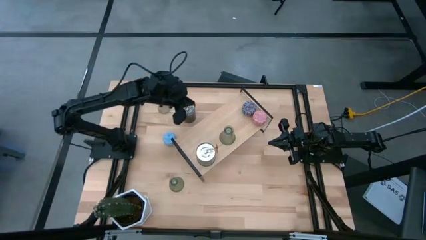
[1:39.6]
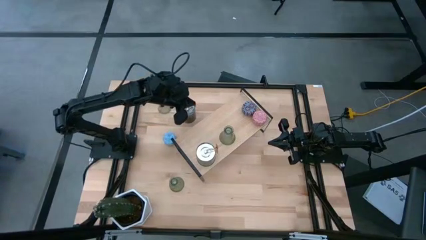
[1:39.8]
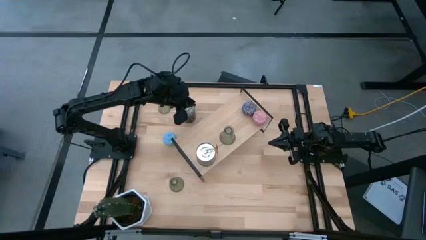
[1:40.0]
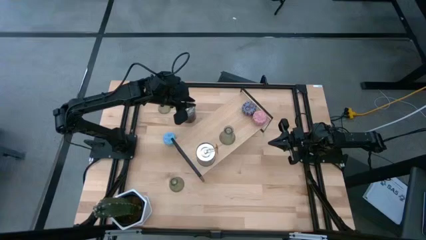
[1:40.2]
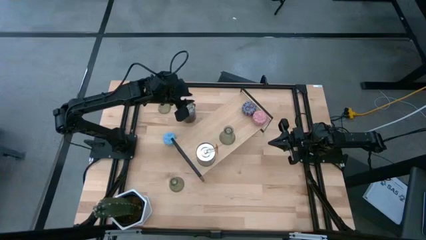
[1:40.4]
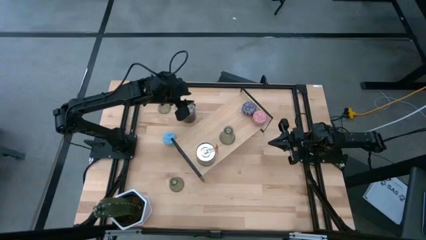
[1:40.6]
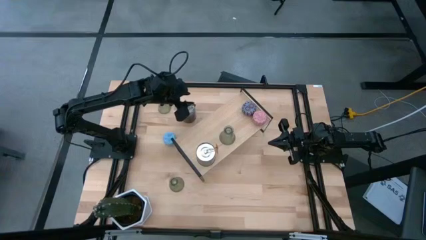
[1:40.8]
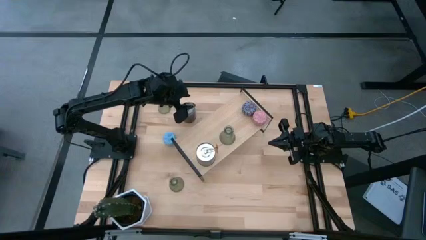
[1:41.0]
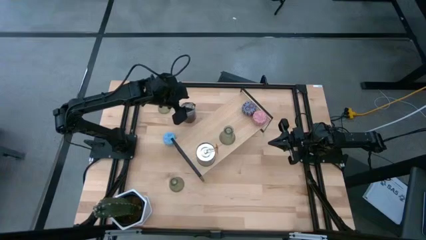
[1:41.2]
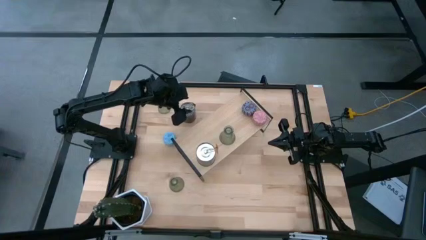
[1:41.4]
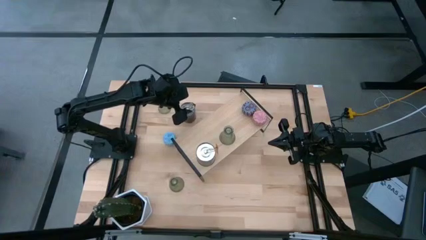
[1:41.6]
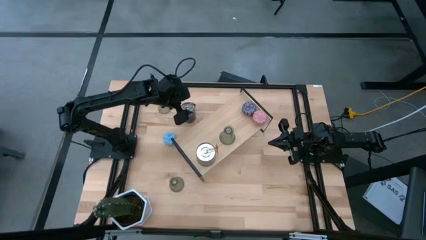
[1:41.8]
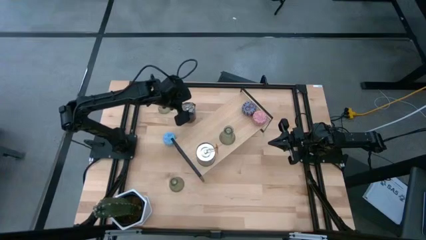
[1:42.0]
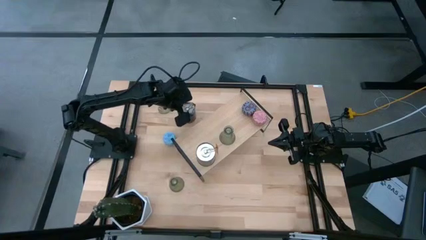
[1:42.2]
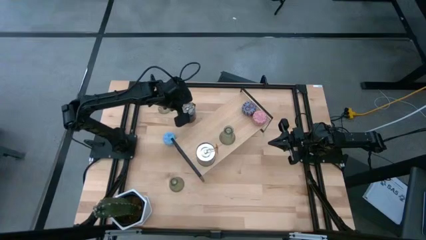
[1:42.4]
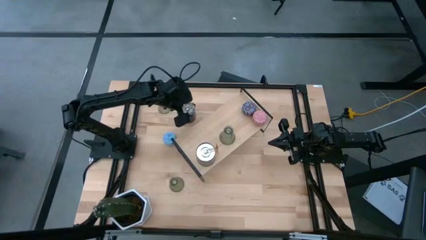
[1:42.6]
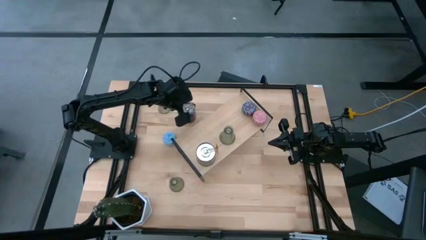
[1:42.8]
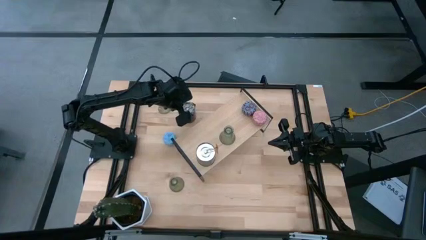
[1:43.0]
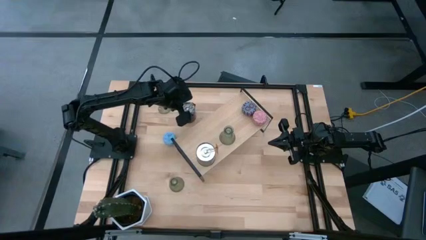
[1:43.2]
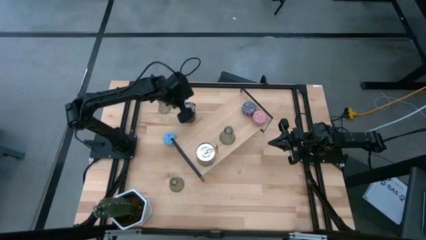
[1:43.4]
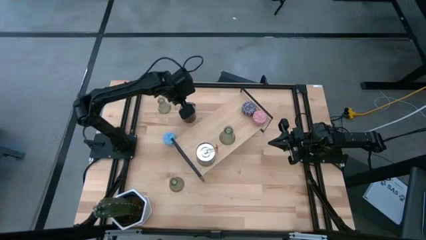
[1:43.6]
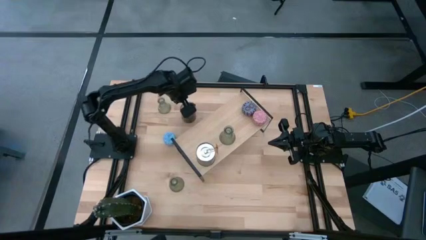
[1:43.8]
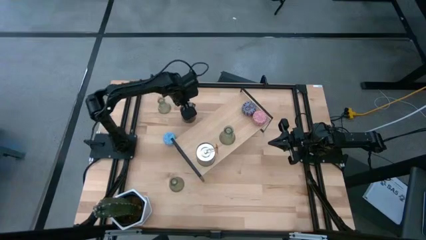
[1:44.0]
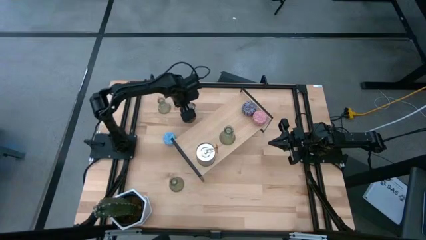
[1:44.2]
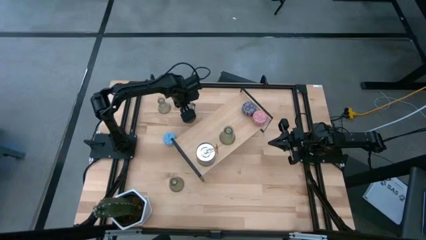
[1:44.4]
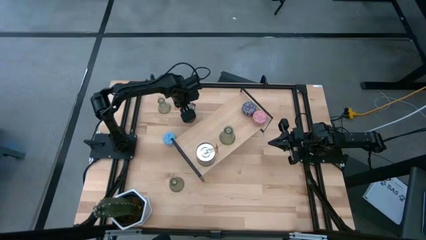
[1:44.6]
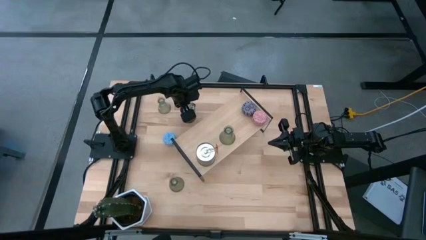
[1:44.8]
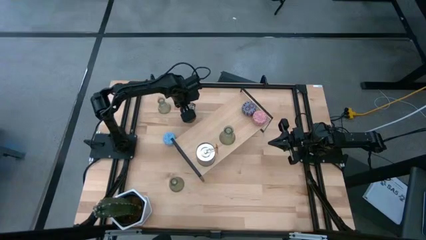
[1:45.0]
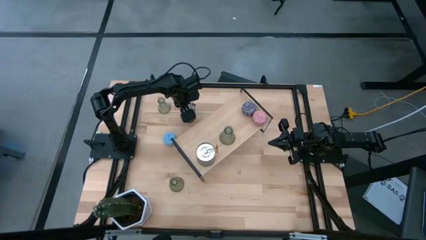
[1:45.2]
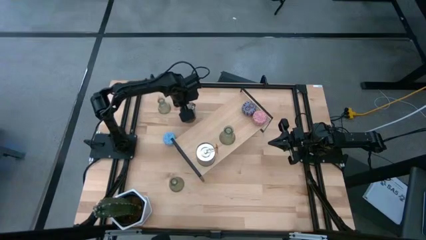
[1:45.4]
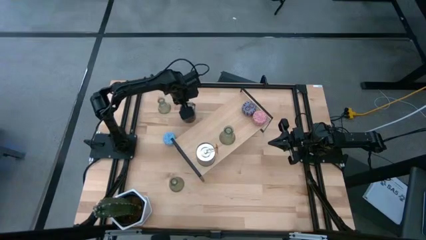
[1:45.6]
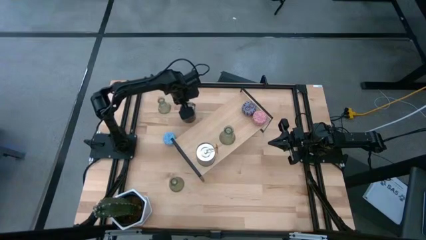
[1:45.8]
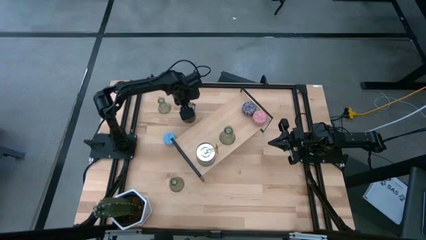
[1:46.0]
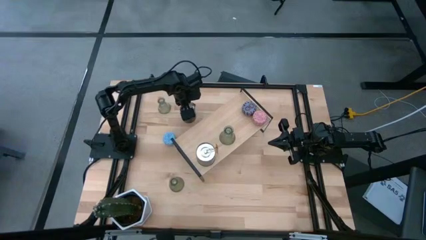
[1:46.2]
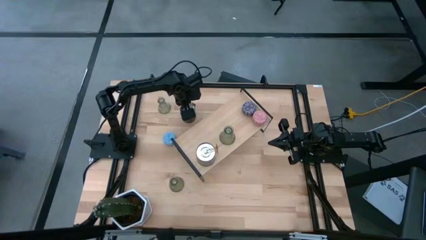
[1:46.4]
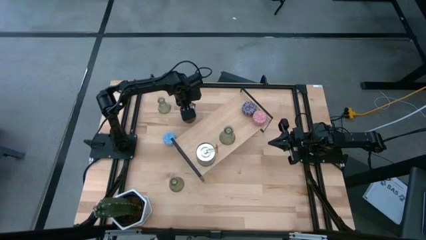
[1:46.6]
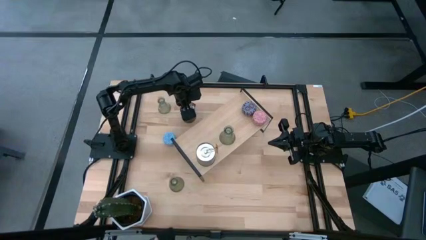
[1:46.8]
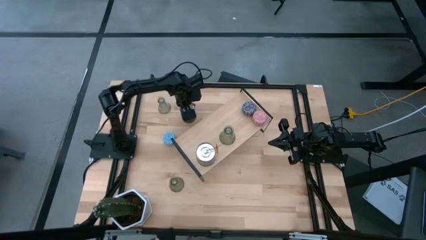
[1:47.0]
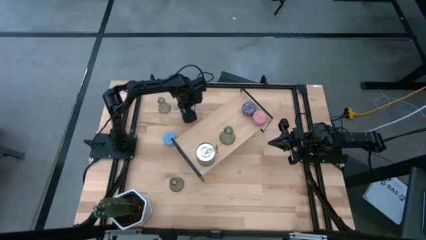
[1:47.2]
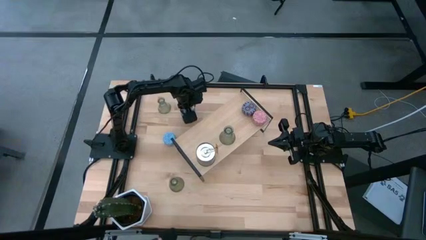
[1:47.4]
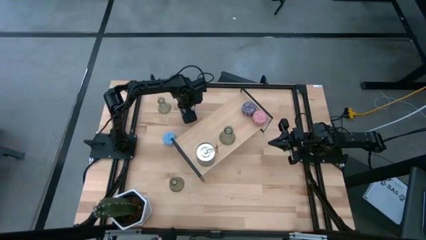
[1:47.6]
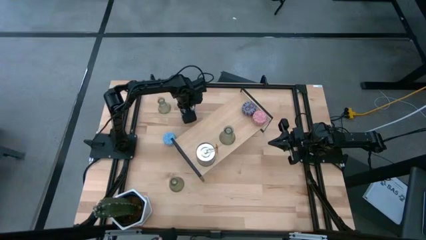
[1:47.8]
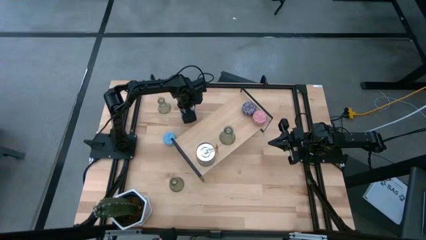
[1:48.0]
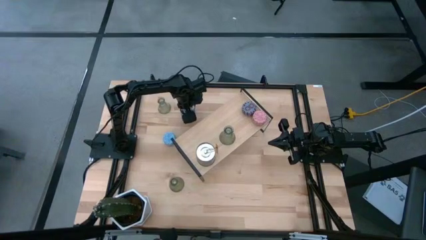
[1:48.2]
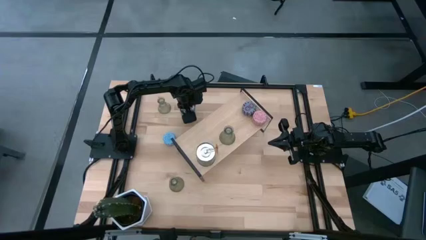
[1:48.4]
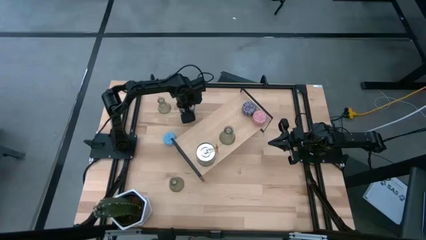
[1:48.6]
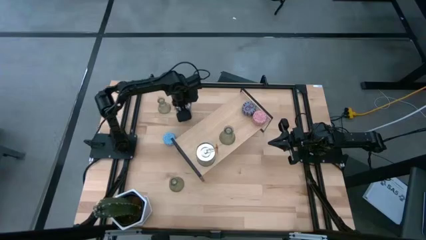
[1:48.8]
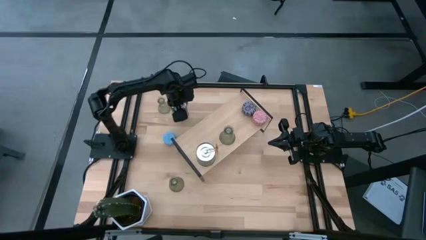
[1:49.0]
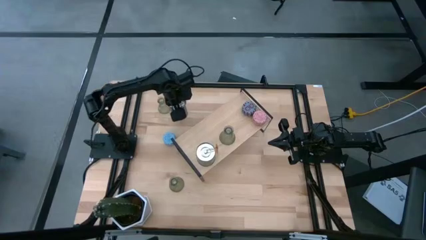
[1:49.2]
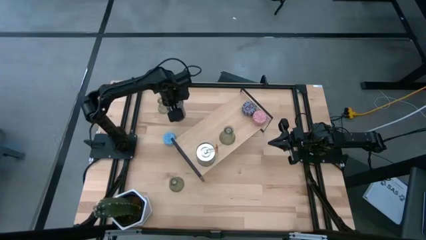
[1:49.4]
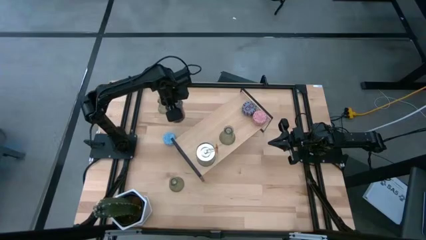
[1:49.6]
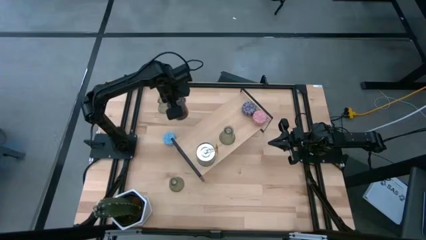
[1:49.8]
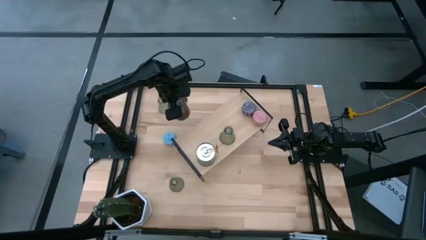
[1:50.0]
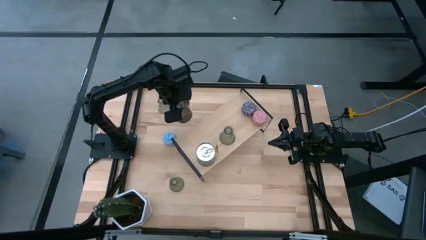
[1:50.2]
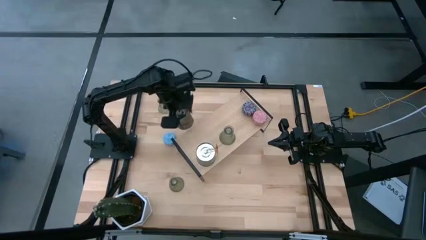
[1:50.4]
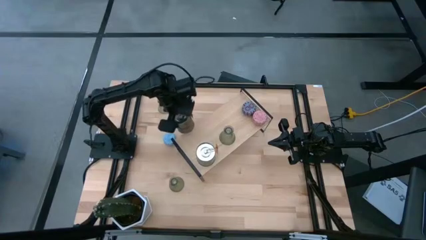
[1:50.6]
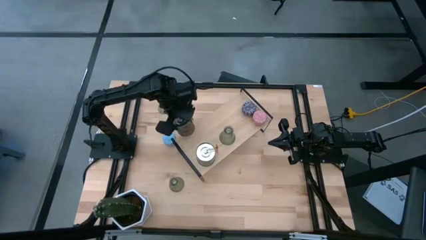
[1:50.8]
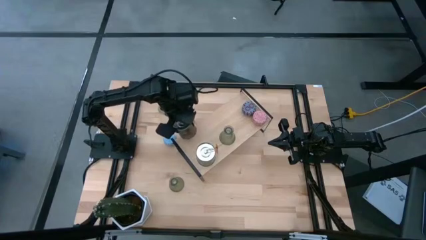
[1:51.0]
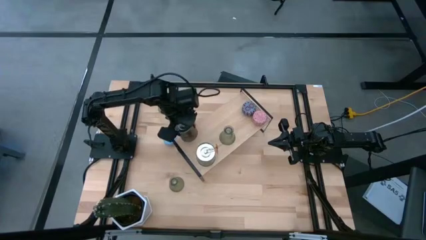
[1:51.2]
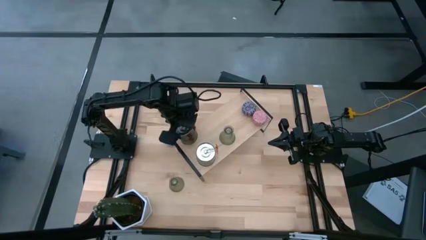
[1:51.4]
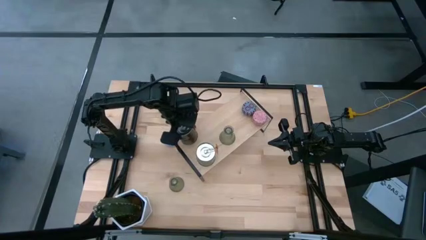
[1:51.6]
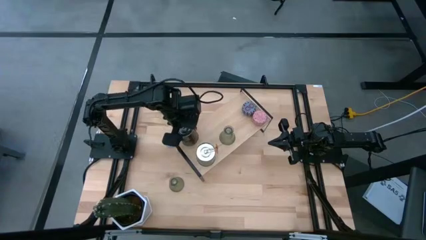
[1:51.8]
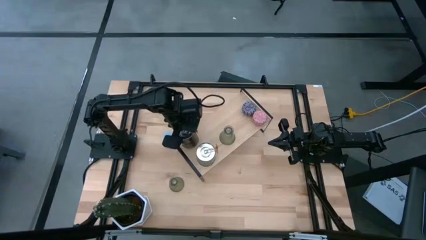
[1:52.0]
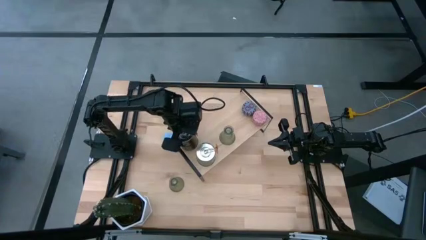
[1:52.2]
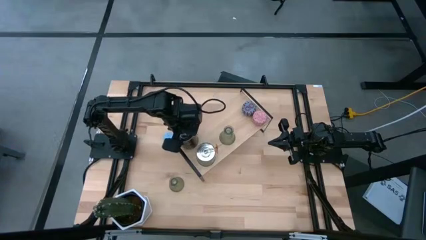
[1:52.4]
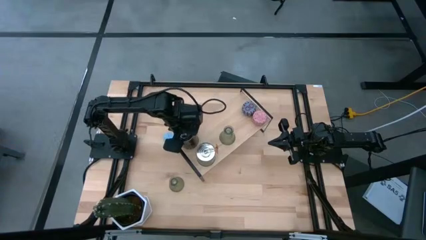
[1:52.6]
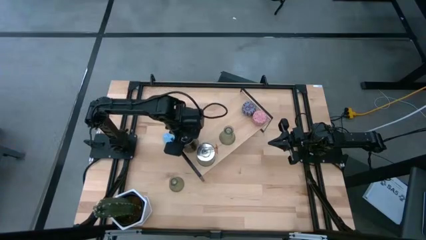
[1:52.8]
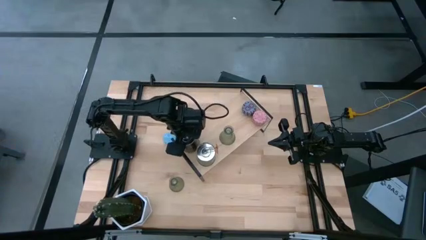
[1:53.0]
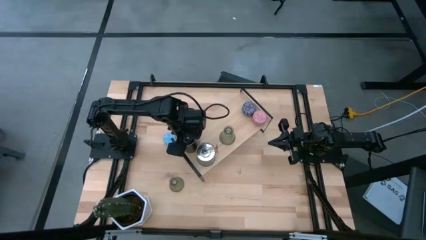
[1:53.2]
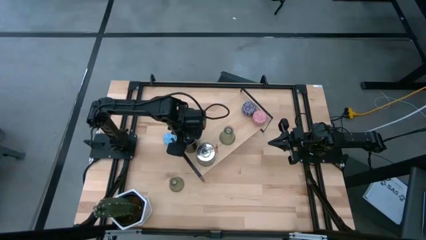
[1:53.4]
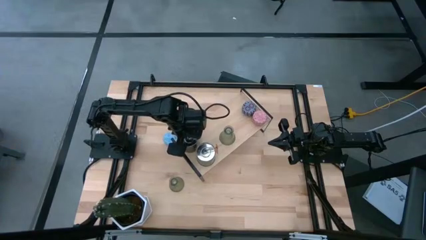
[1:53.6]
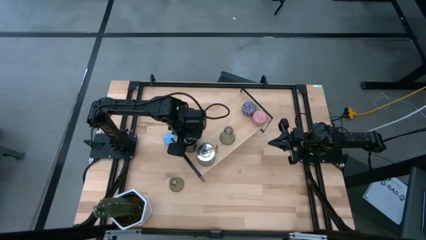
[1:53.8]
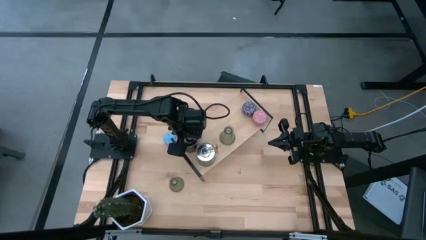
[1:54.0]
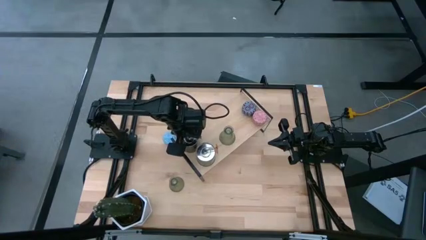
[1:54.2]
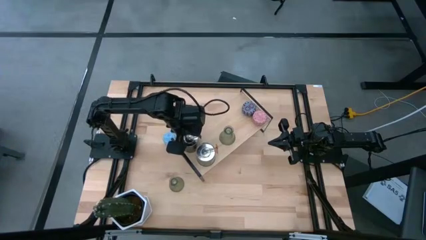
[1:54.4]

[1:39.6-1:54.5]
Task: Pick & Place candle stick holders
Put the silver scented candle on the shelf aligned with the other silver scented candle

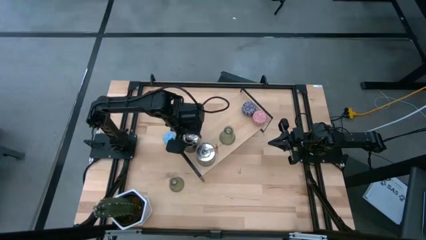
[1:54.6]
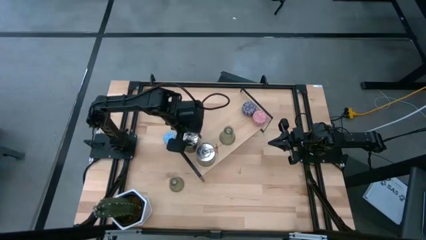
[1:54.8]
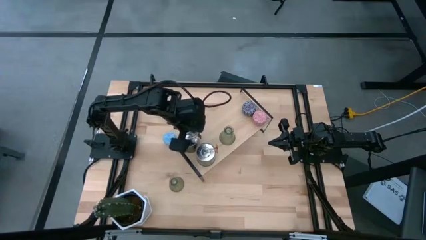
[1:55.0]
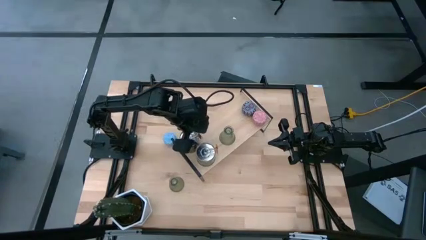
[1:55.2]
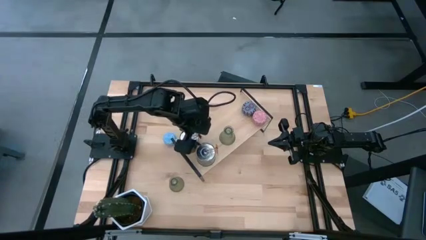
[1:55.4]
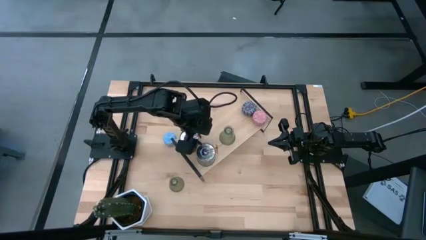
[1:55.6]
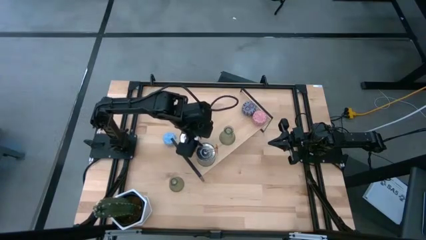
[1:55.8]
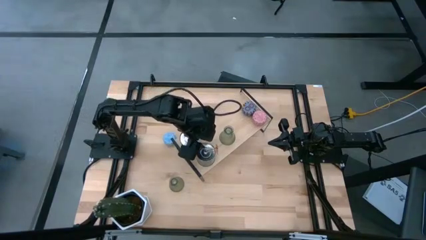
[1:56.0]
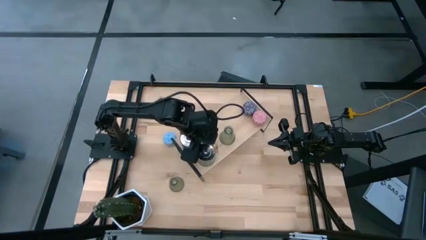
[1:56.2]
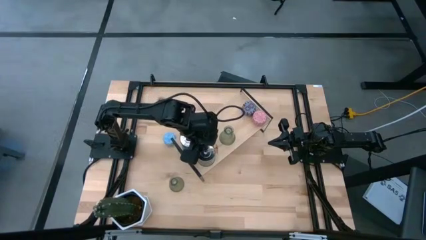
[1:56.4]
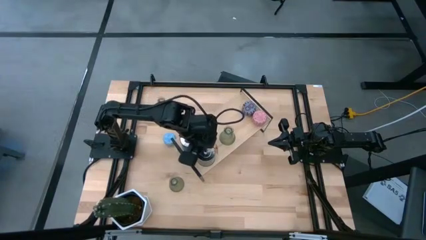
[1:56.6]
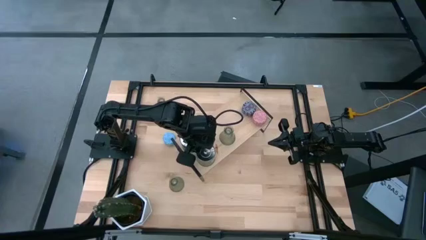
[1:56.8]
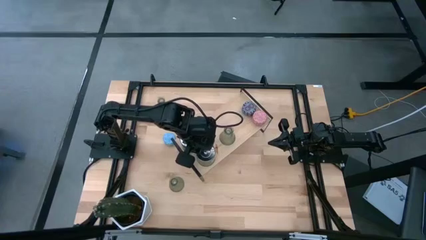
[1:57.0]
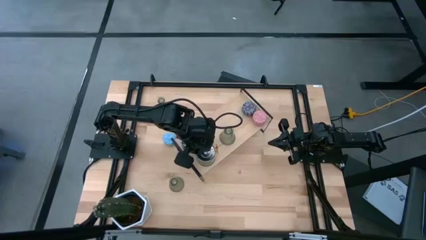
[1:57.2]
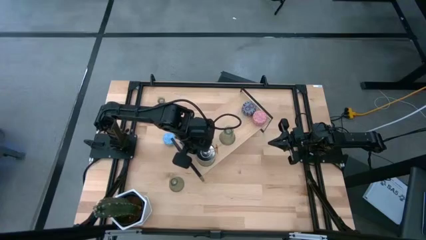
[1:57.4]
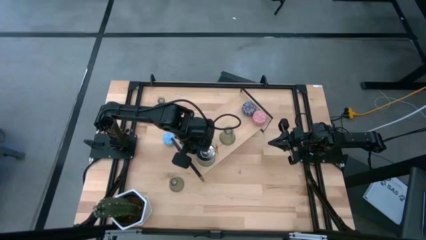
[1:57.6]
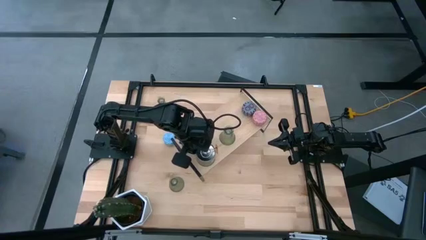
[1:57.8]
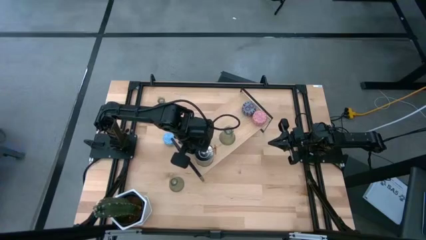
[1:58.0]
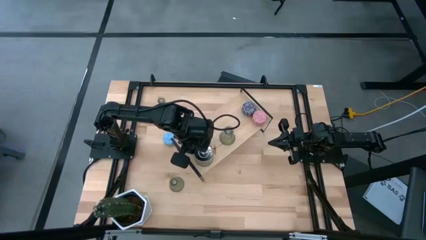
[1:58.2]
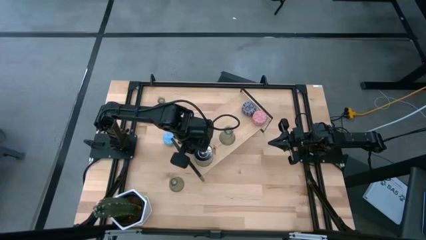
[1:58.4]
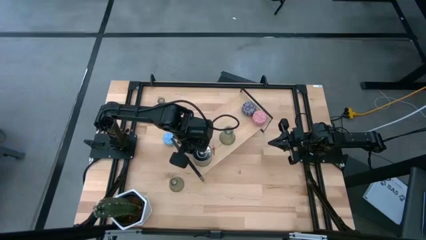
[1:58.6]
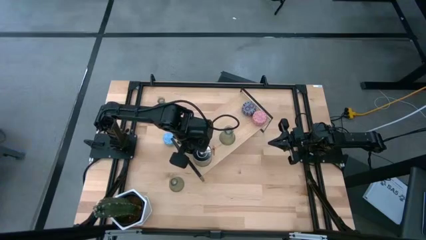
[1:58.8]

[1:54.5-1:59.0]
Adjust the silver scented candle on the shelf
